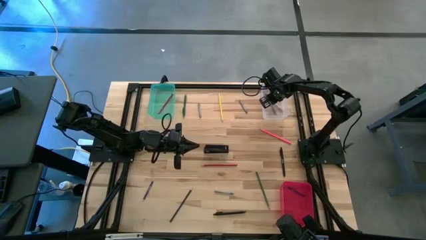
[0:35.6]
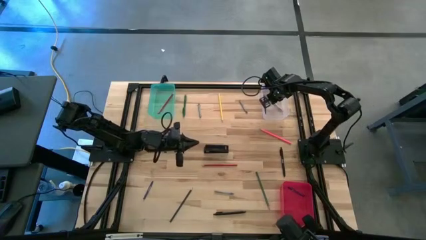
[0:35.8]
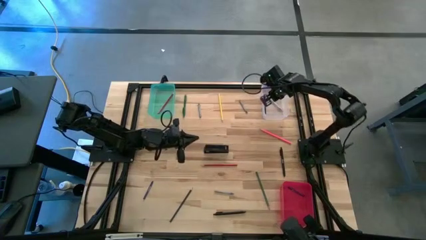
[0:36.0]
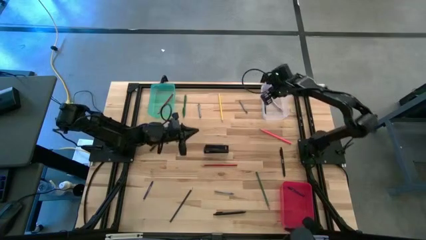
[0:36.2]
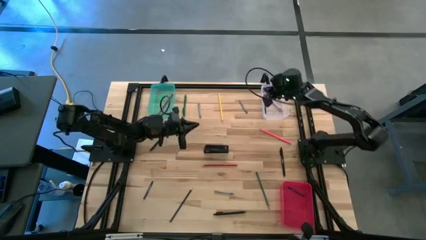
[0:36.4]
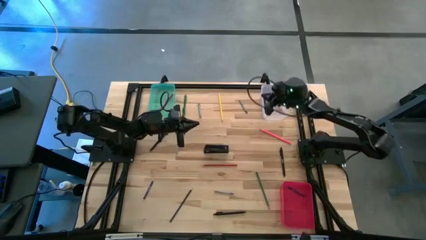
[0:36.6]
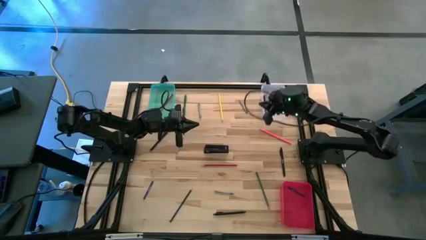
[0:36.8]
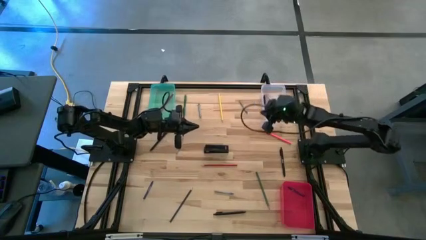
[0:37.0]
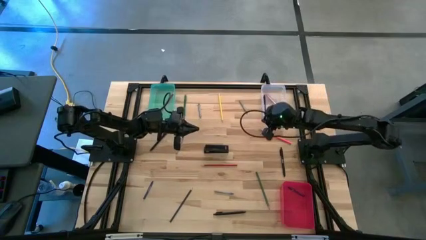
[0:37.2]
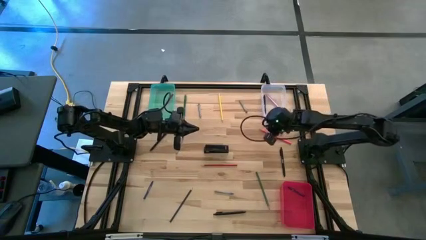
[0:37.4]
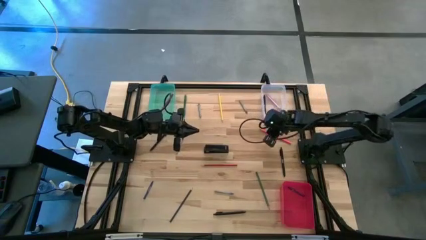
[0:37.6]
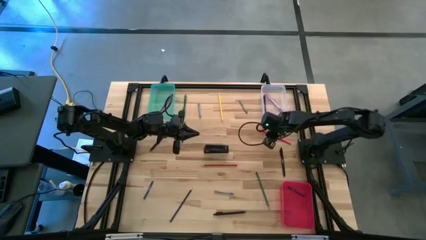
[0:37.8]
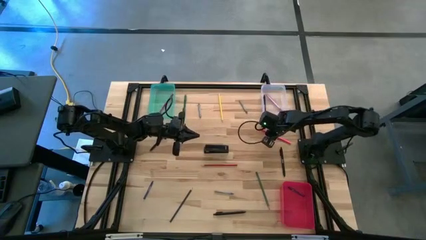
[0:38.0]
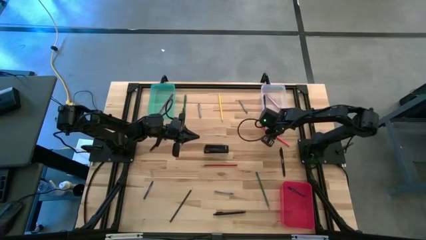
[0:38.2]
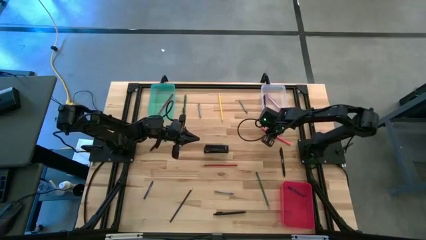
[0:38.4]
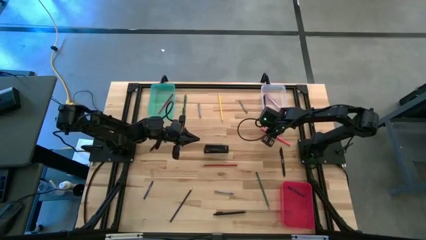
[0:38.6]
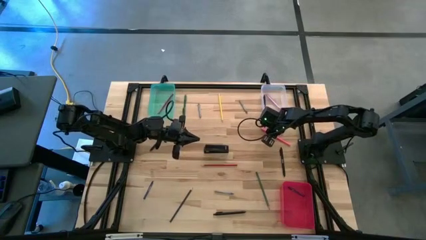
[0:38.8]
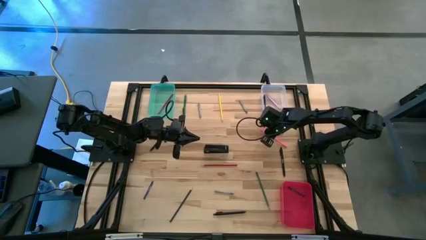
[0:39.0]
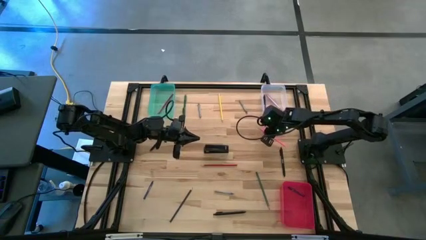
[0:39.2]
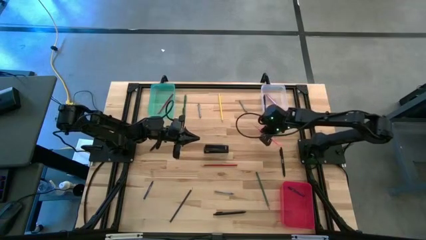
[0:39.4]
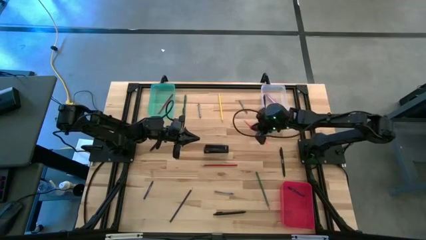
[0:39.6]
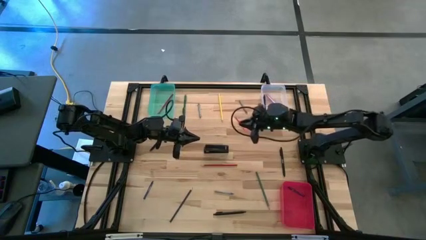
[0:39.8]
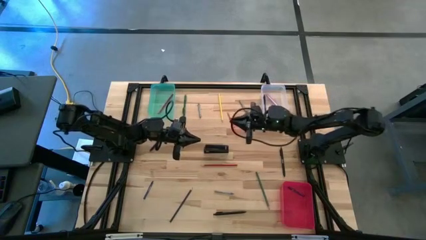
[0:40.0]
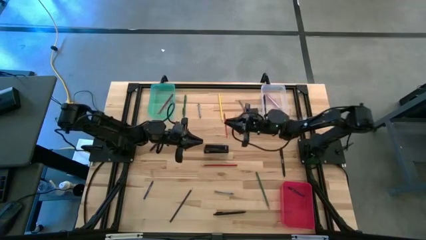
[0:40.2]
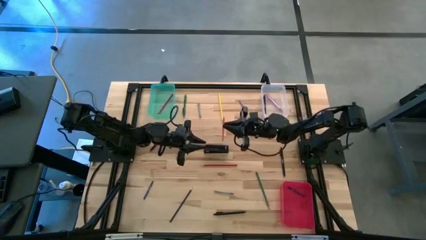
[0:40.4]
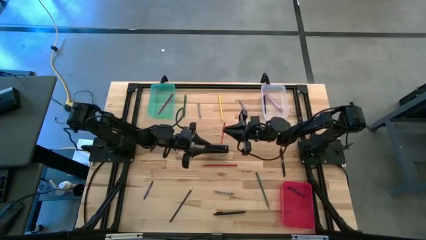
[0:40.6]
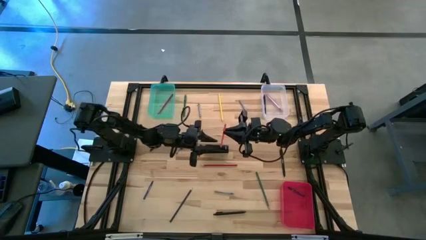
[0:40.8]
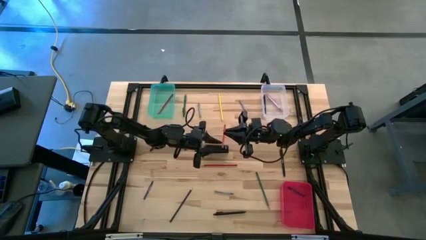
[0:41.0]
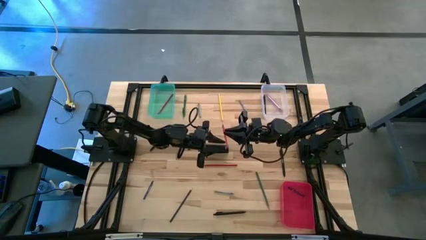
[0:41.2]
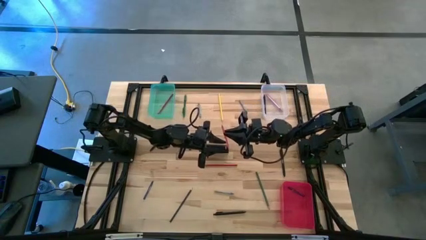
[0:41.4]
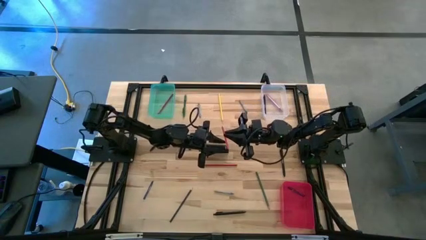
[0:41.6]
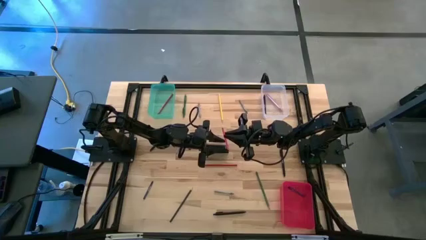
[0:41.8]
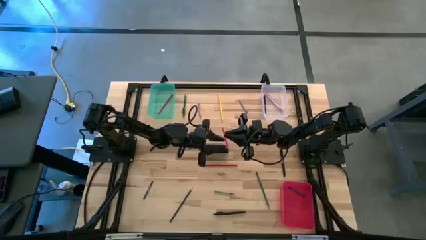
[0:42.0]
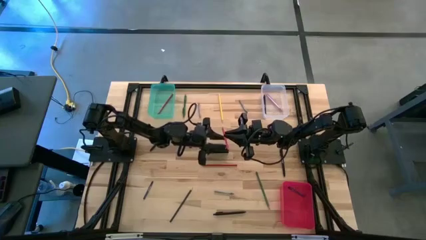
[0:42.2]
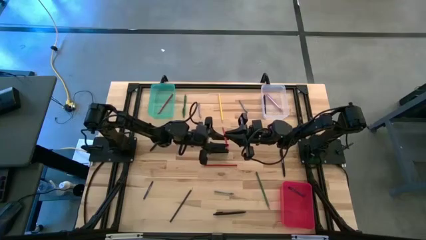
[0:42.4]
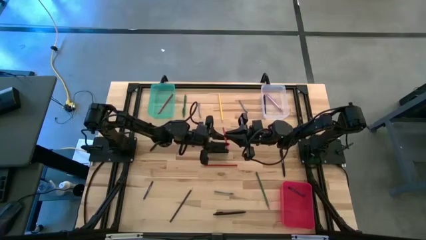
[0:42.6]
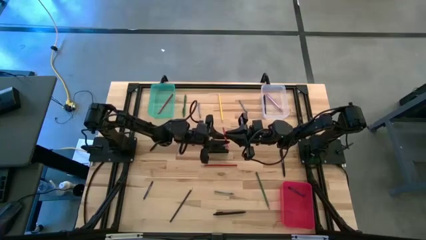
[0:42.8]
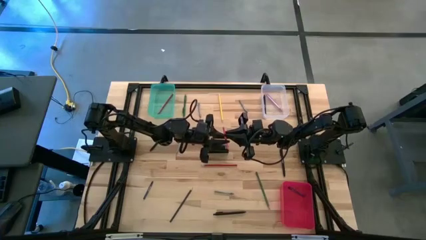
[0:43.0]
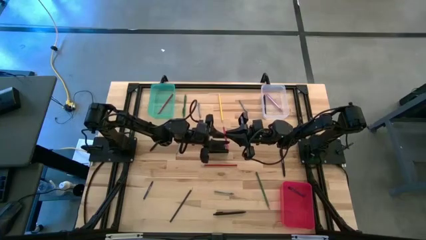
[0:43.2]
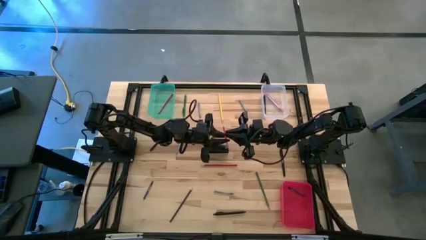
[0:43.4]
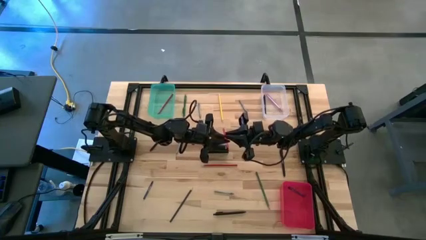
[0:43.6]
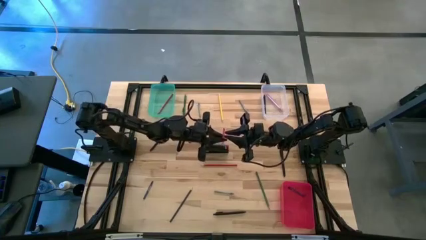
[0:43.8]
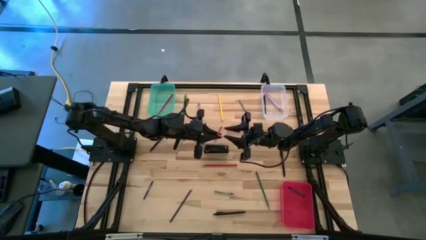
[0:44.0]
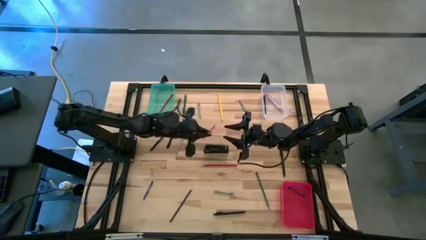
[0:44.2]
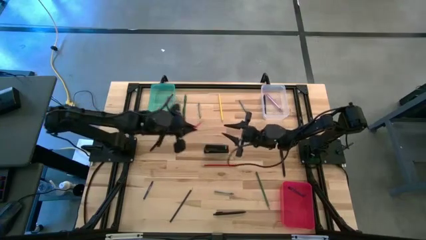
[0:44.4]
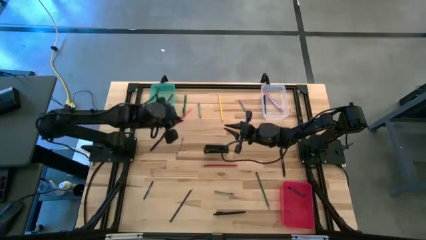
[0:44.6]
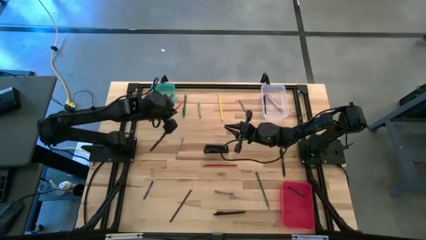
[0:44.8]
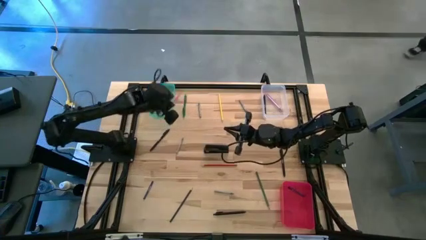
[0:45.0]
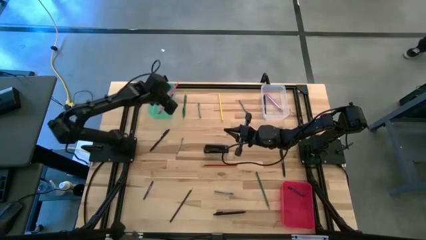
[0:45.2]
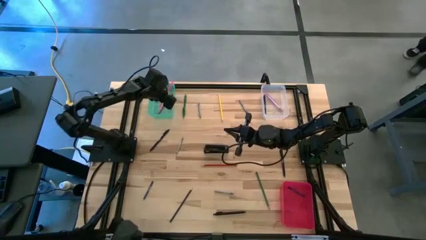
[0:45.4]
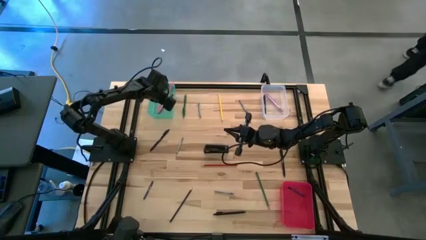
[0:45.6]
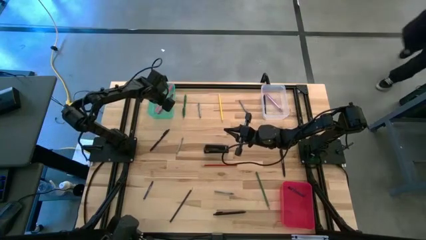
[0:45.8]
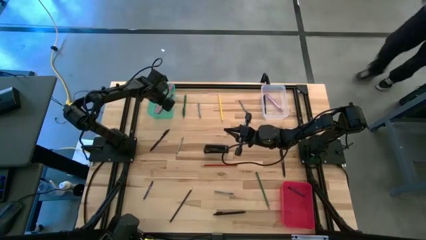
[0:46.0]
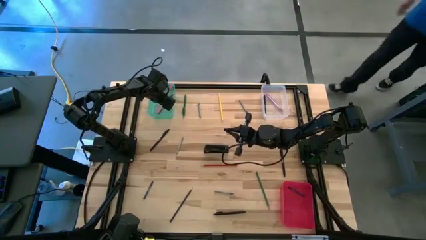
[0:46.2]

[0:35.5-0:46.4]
Task: Sort crayons/erasers/pens/pencils in bins
Put the pink pencil into the green bin

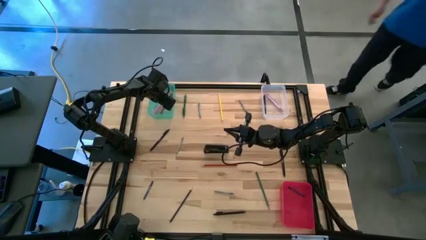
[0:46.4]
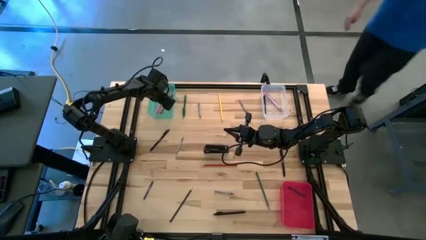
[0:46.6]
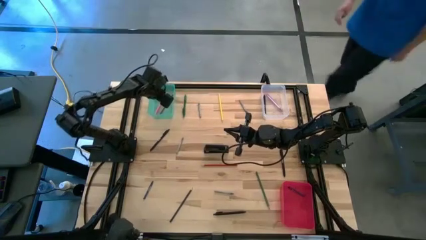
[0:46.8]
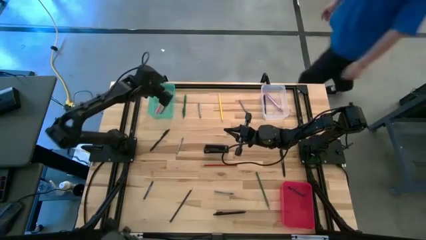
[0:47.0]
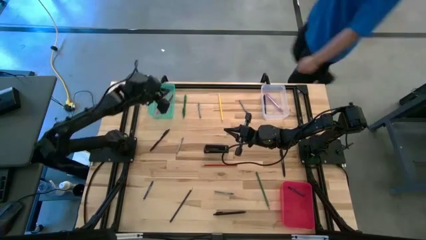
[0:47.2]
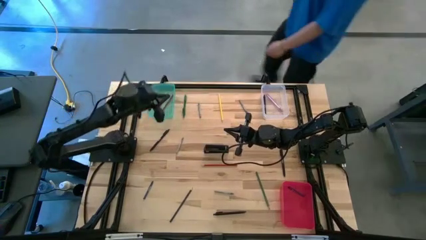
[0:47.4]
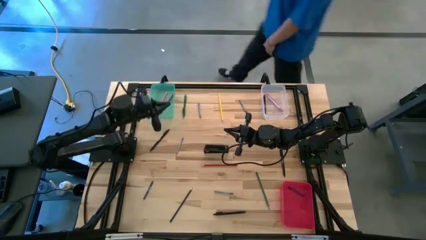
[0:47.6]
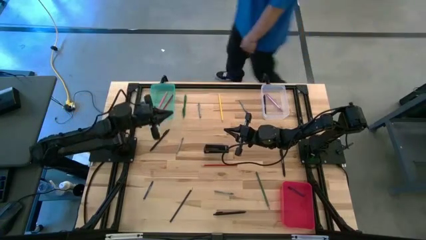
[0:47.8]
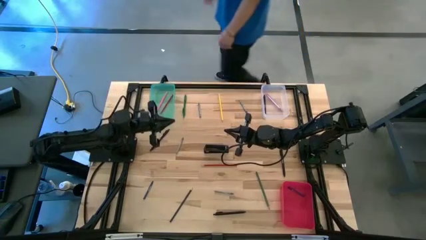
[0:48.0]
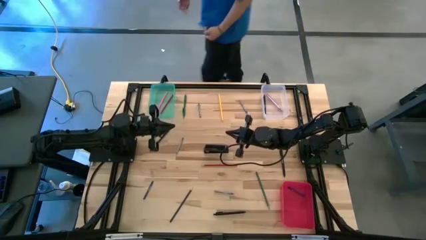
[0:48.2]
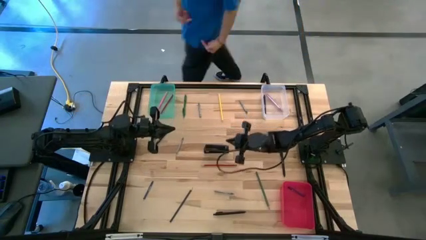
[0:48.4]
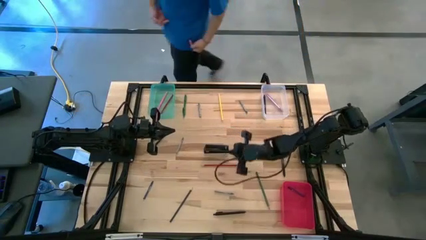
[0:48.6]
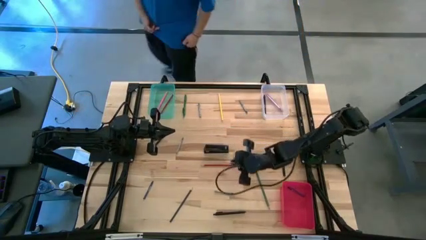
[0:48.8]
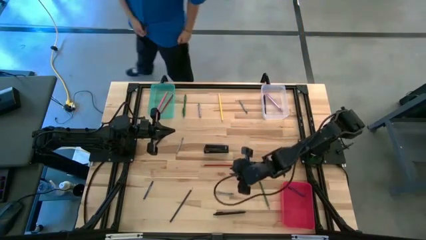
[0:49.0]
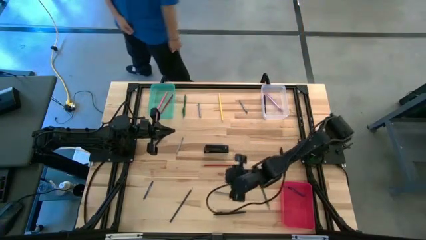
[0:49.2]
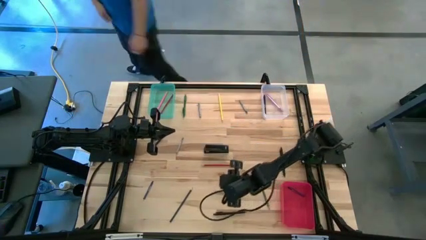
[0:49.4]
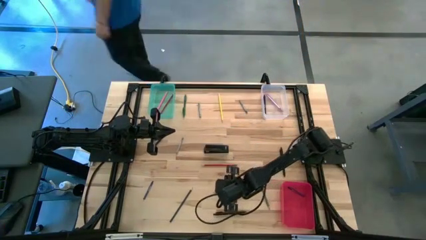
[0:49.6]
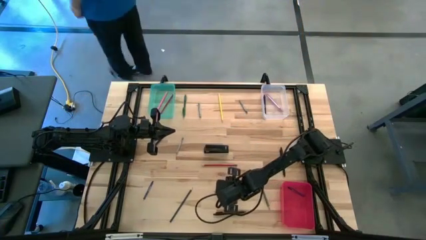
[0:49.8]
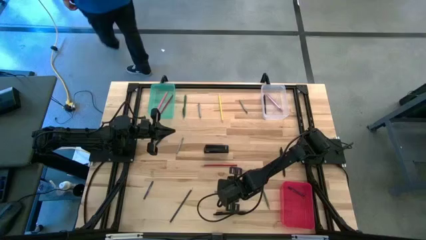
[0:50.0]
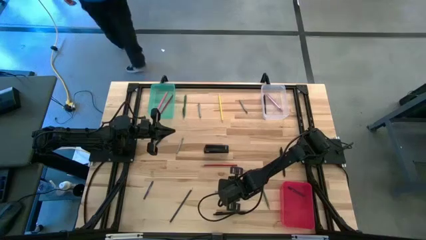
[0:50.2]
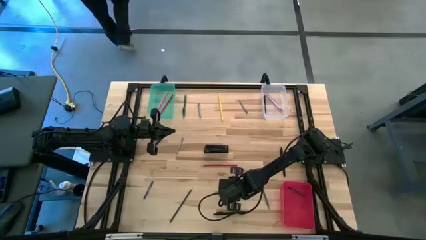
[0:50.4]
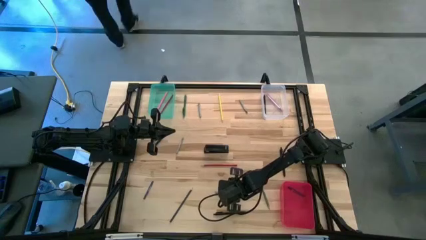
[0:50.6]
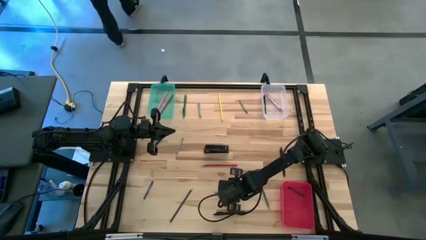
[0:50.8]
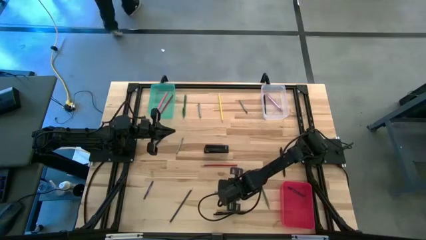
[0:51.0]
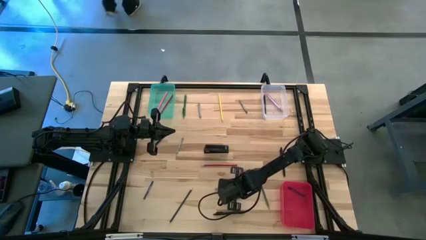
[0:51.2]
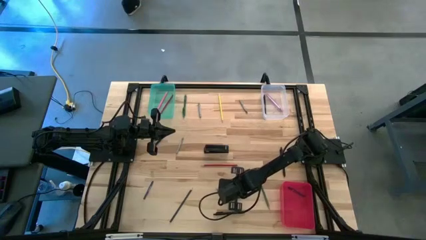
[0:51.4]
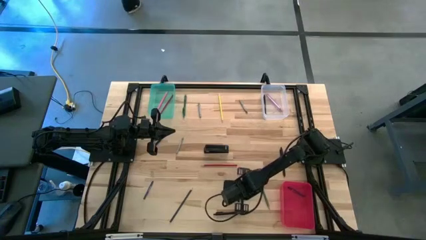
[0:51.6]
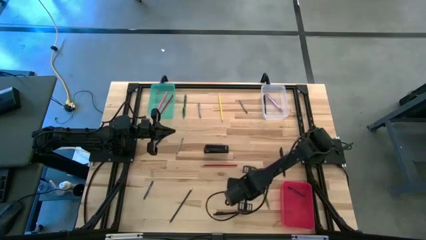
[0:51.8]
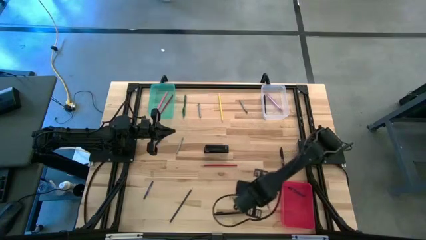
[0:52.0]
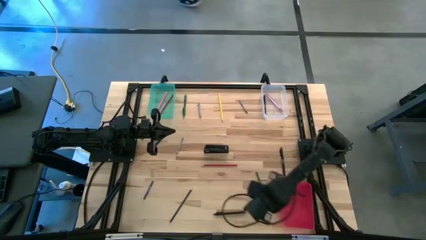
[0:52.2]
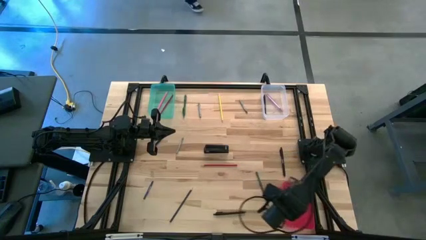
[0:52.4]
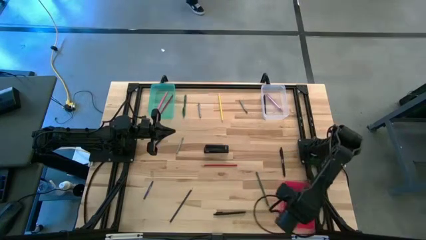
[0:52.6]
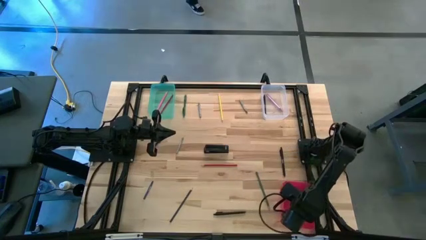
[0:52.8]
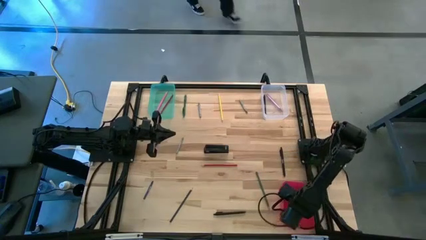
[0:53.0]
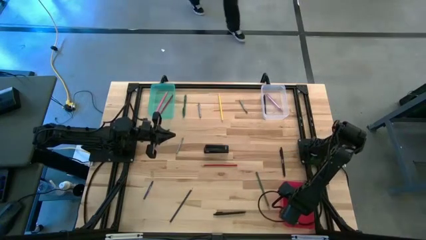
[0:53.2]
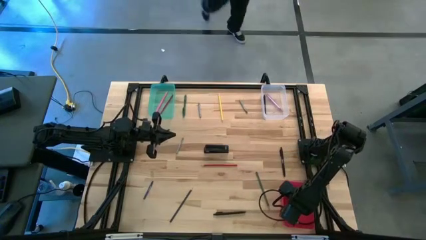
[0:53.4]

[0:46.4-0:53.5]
Put the gray crayon into the red bin
